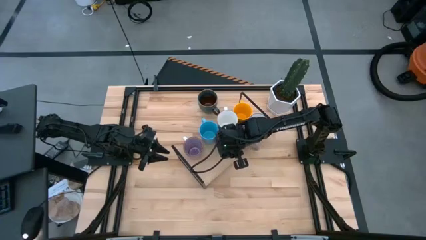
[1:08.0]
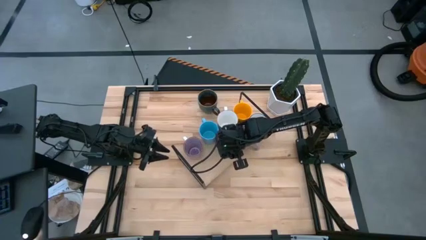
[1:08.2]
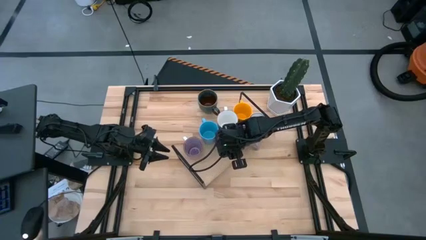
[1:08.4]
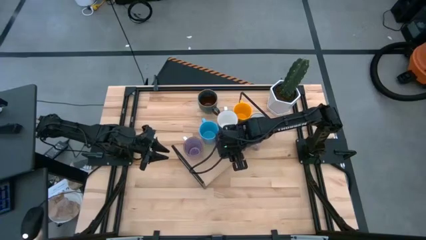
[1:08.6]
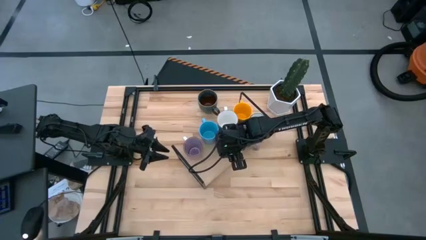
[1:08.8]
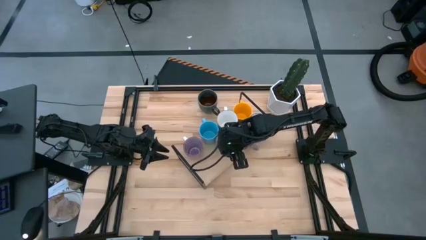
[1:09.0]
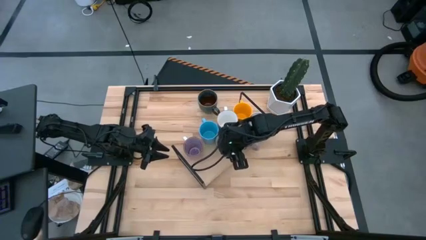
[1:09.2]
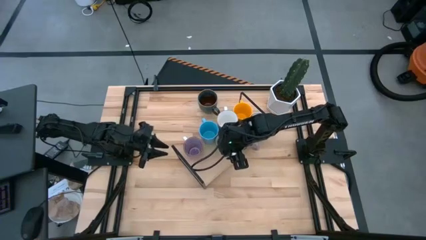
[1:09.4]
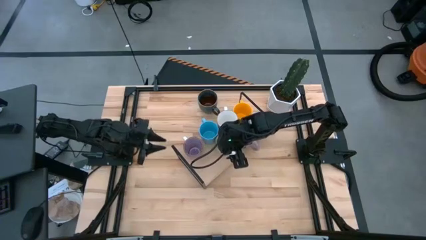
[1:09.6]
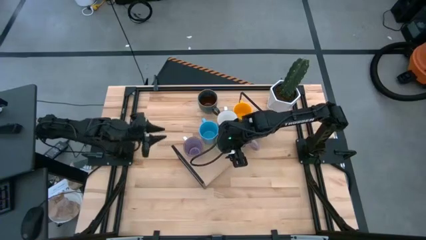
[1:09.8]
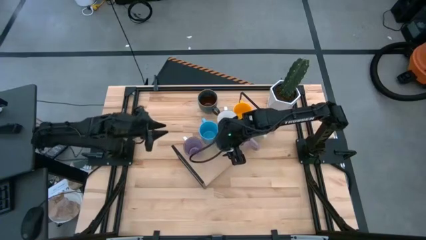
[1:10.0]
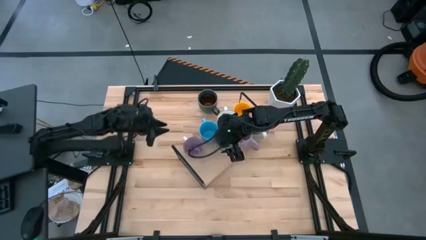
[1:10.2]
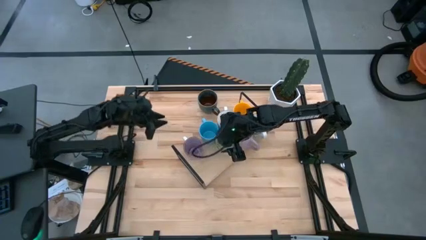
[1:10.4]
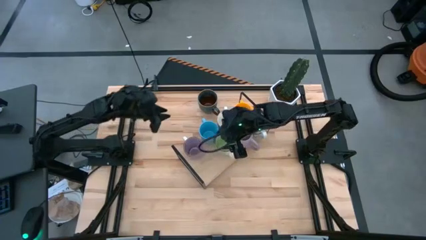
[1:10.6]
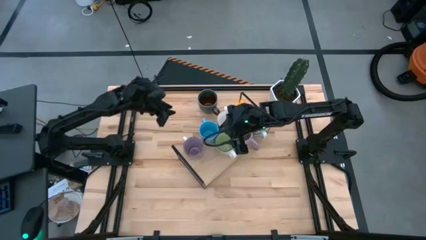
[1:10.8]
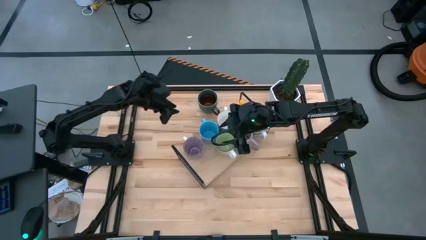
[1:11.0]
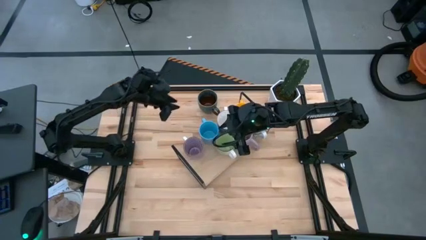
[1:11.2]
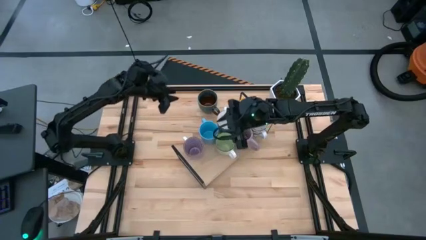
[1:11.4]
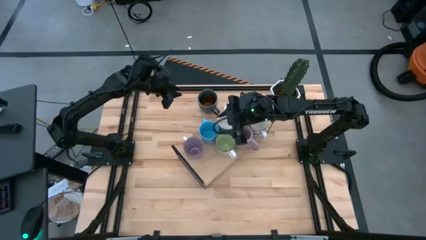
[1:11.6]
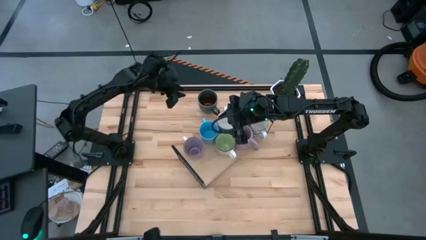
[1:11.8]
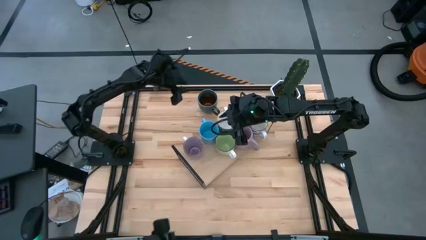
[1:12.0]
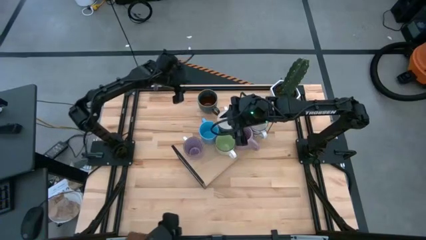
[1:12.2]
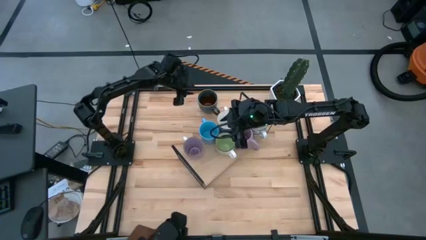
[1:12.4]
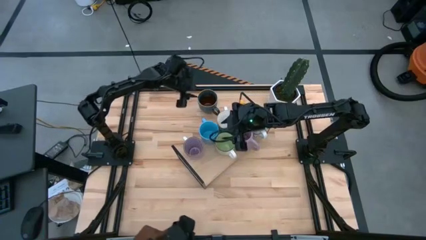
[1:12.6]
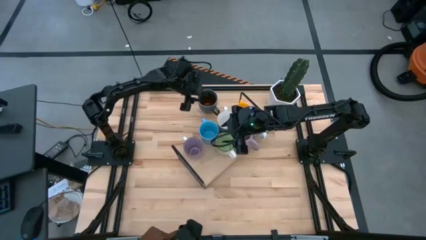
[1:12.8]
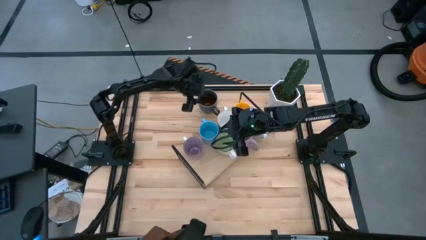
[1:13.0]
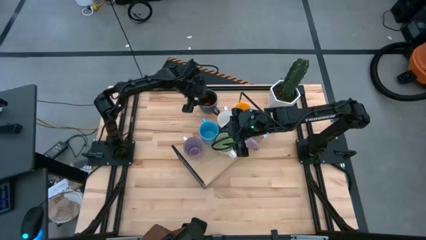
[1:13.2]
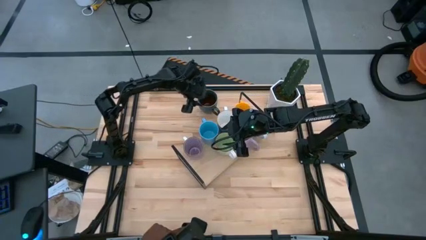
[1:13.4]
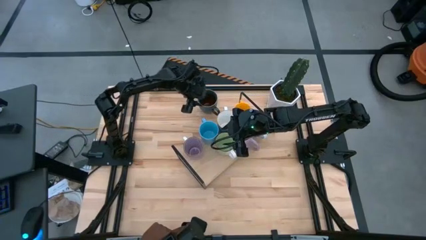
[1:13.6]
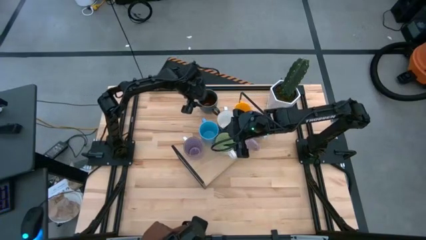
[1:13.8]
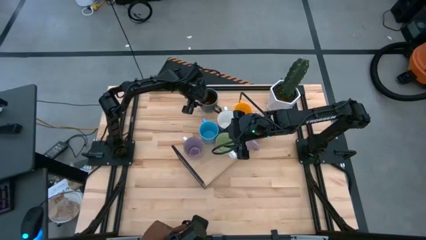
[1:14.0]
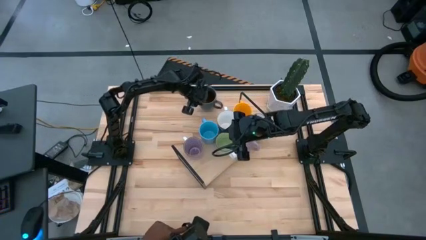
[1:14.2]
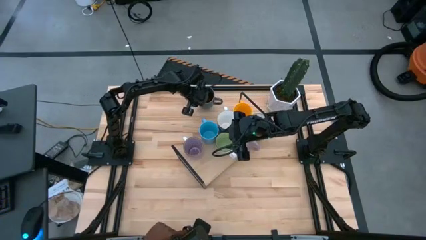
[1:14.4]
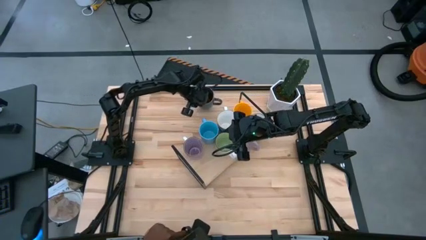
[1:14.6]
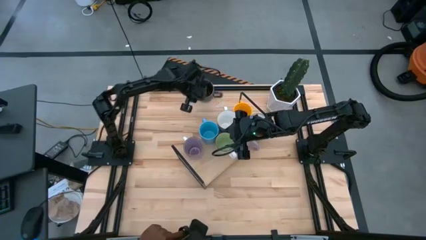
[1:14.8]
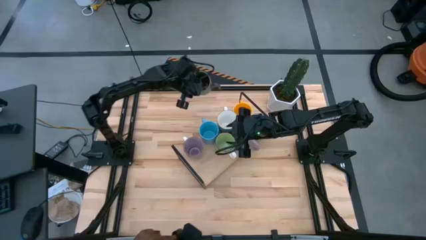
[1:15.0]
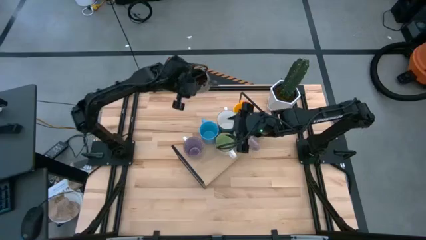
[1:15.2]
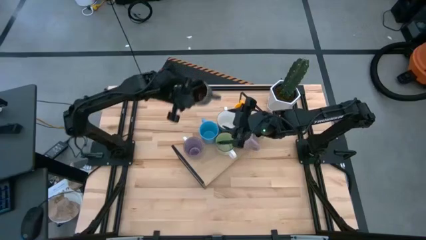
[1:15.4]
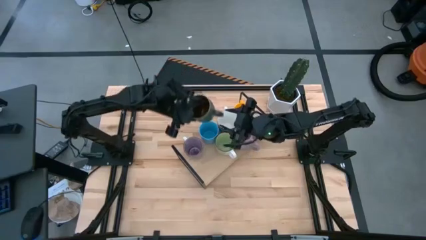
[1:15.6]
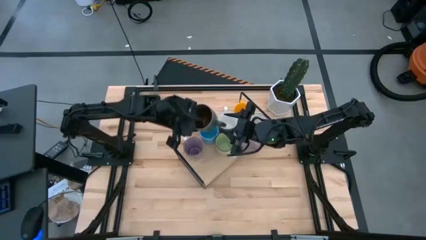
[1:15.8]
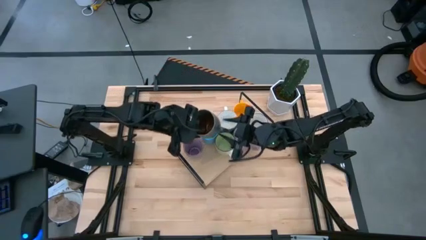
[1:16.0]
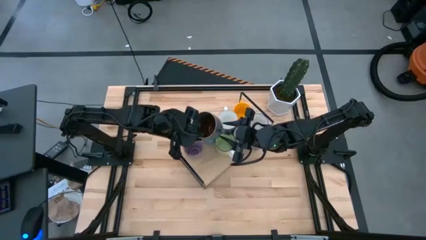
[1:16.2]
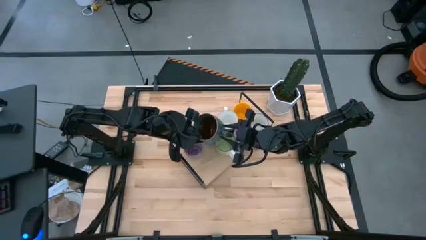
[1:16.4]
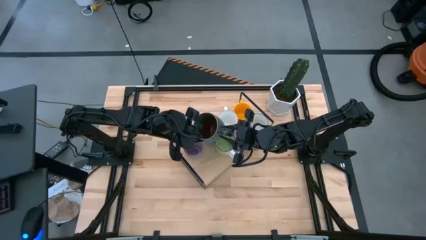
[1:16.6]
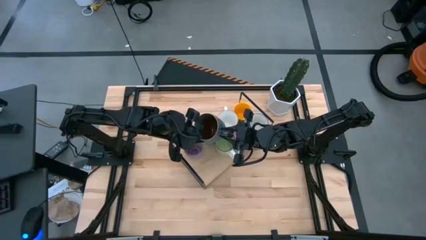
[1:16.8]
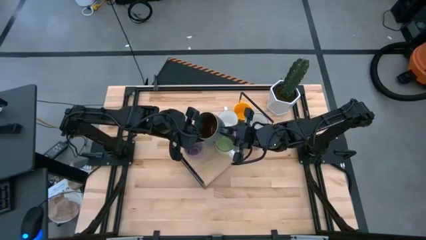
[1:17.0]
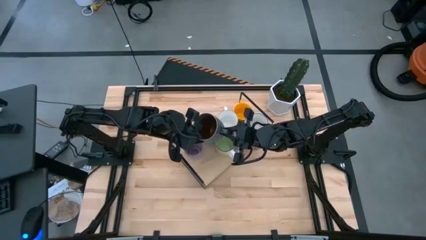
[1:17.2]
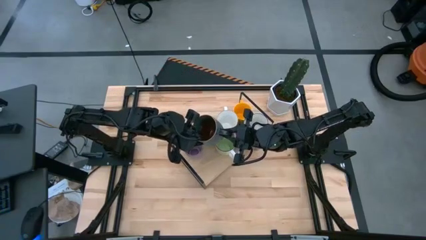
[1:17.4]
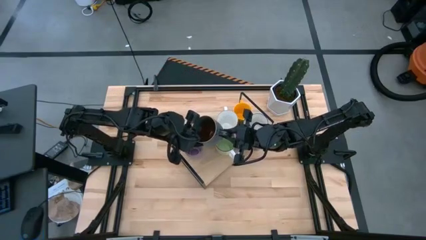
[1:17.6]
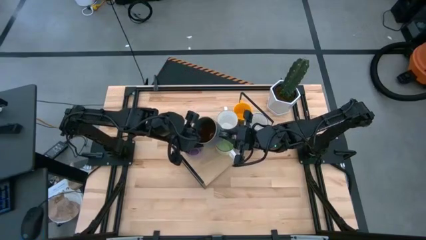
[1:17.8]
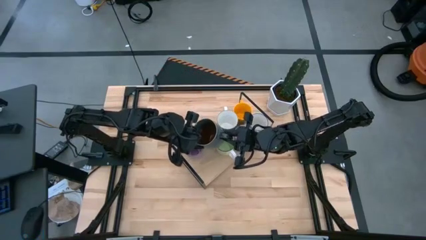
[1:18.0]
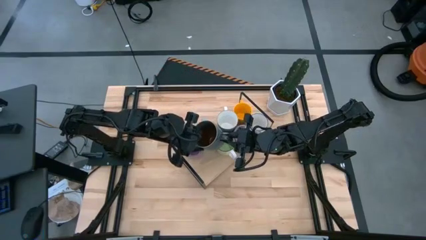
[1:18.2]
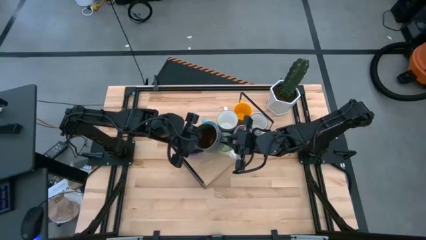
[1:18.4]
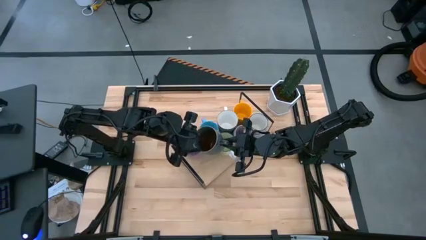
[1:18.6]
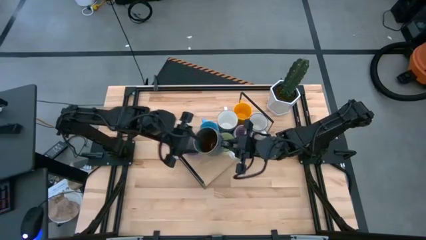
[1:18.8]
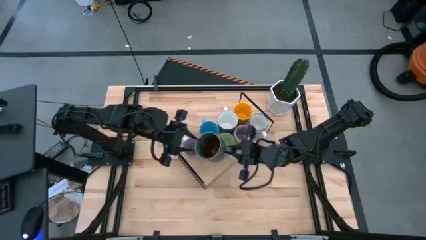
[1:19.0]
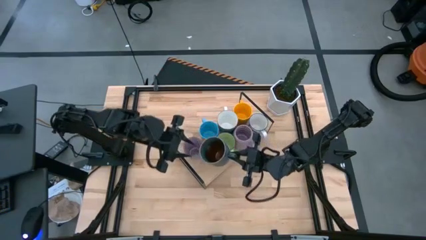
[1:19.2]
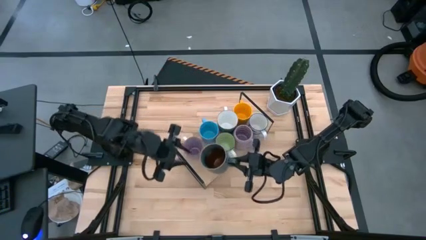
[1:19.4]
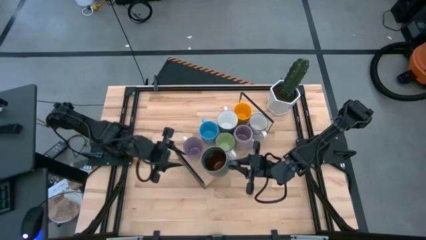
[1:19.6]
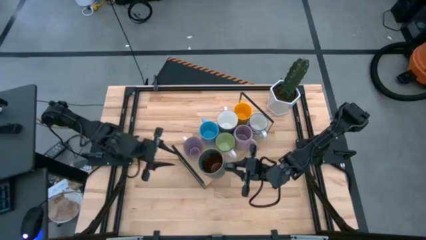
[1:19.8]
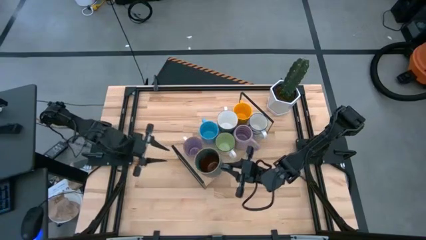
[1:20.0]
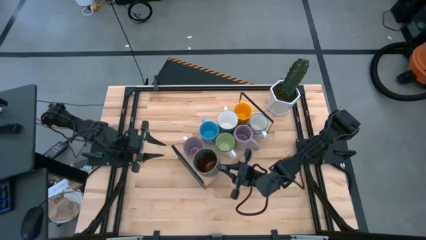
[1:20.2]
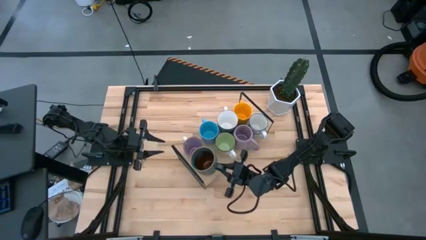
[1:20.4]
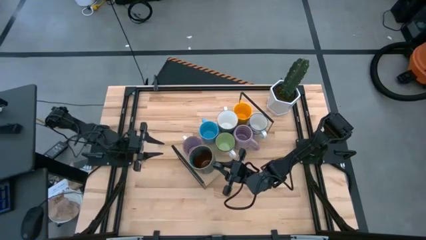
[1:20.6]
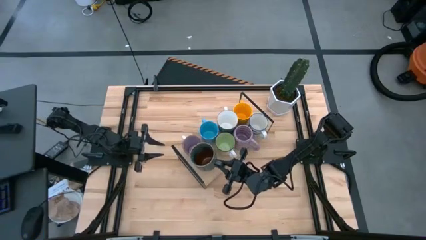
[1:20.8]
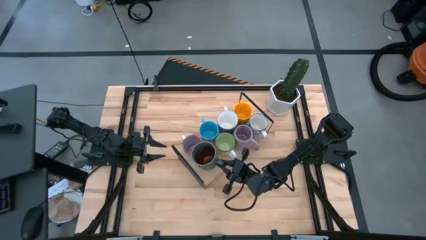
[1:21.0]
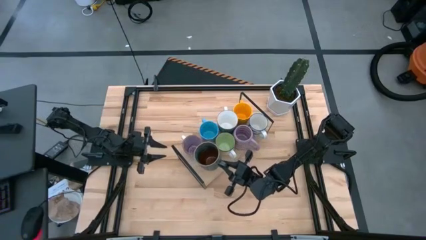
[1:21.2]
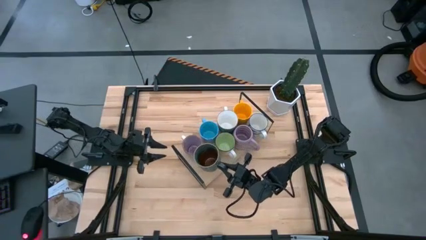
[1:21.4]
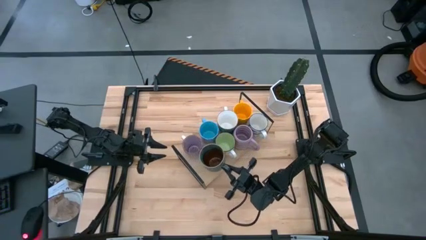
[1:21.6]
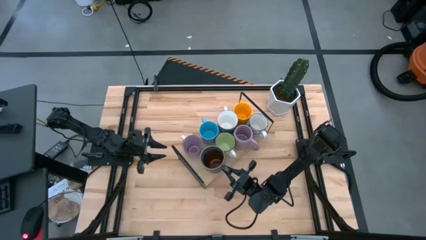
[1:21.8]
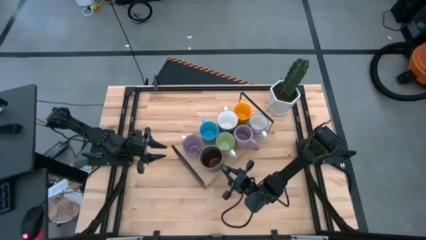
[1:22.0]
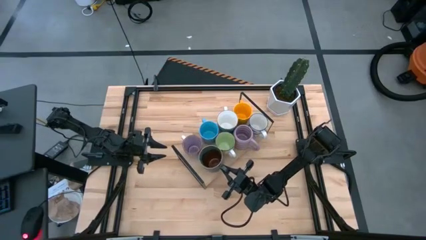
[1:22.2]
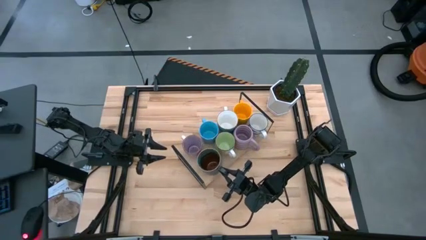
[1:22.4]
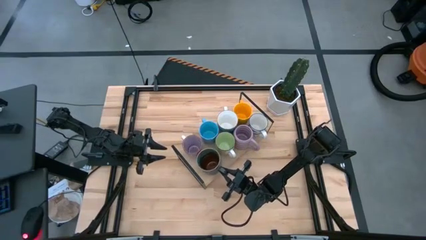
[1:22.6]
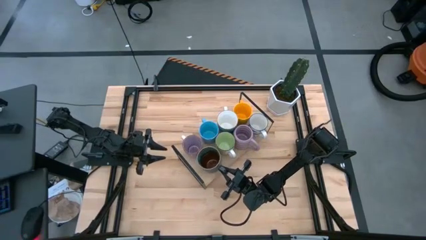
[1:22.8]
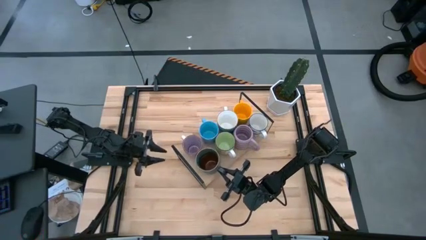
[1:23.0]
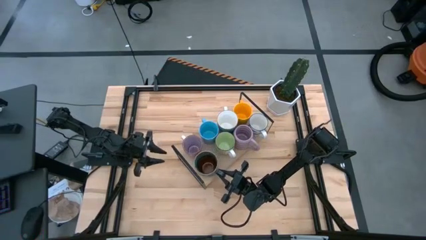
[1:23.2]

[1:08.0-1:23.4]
Task: Place coffee mugs
Put the blue patterned mug on the shelf

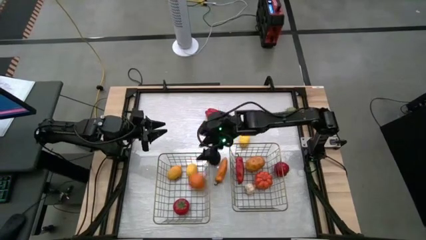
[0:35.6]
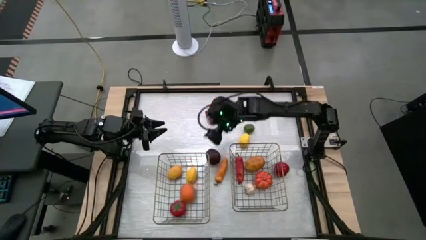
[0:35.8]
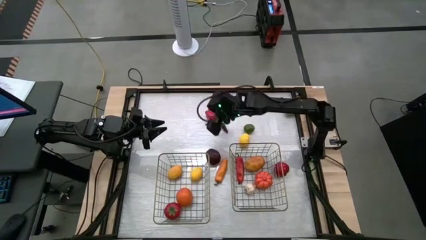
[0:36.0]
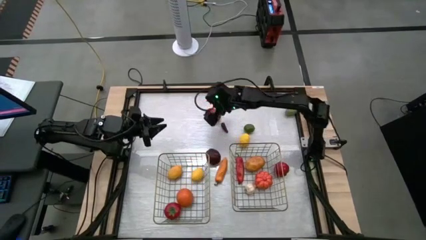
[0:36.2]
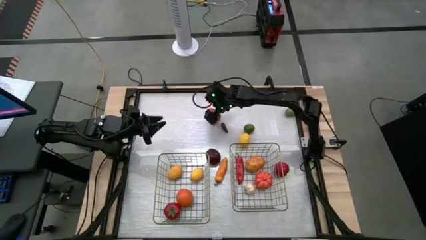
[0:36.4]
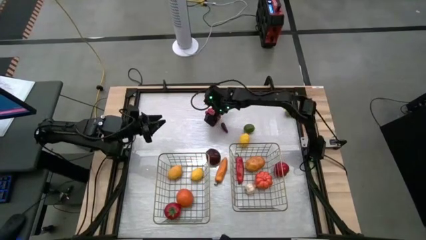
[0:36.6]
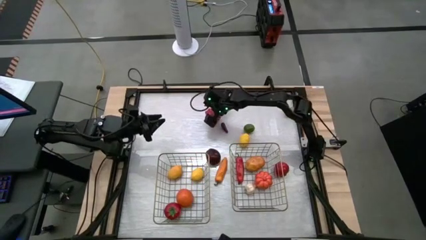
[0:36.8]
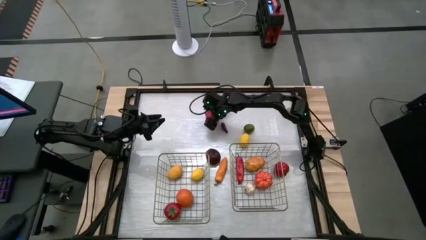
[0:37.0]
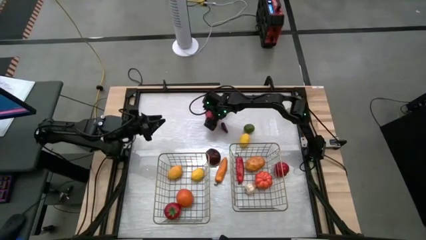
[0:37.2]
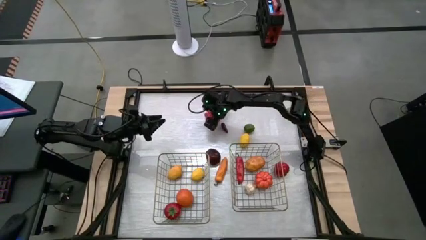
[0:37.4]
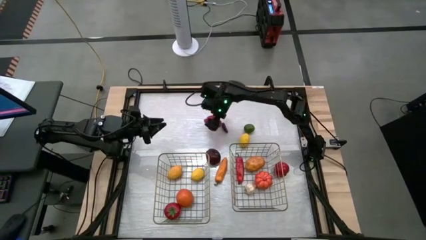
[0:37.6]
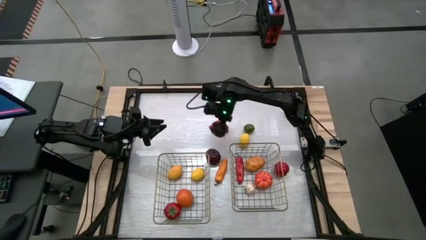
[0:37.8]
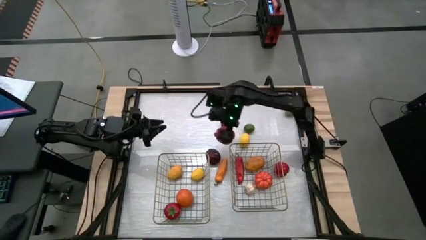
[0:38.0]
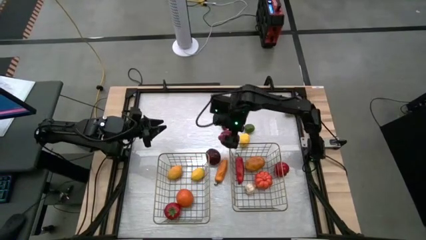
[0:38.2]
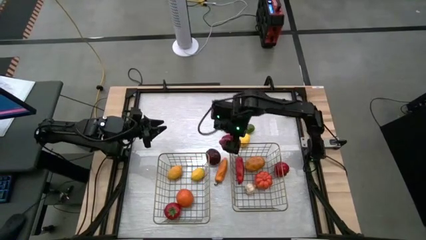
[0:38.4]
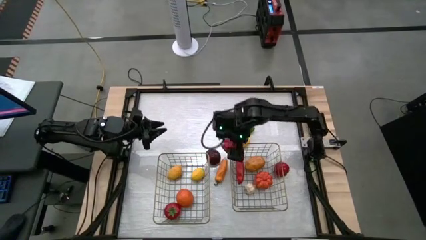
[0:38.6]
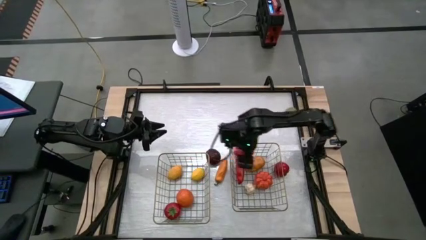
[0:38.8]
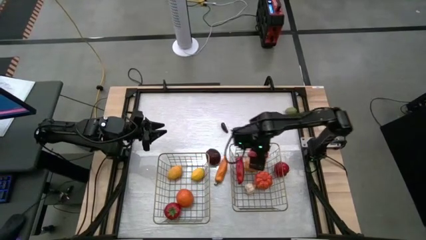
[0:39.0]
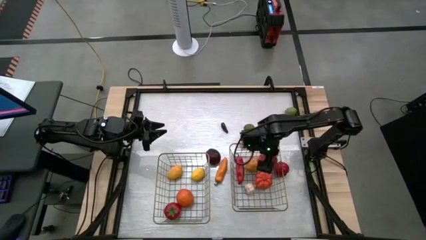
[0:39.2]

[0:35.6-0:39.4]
Task: Sort produce into baskets
Put the red bell pepper into the right brown wire basket
